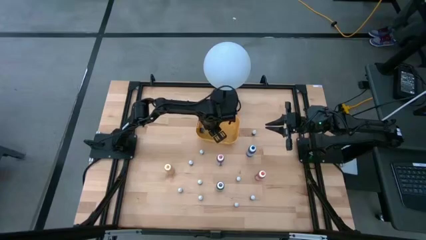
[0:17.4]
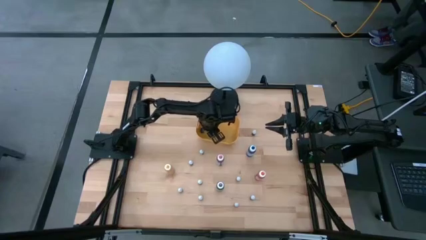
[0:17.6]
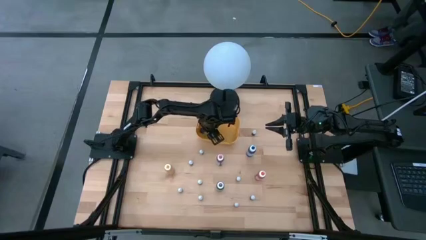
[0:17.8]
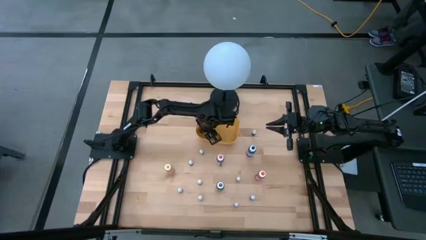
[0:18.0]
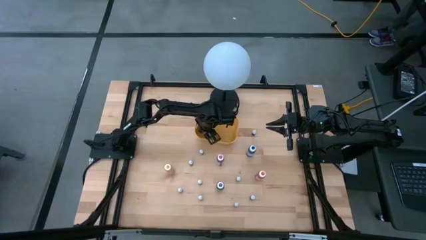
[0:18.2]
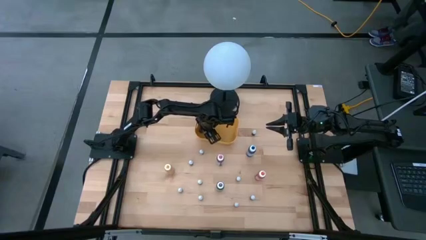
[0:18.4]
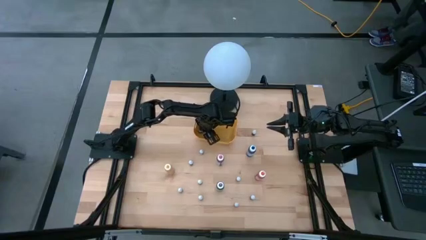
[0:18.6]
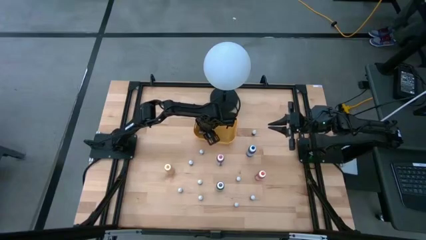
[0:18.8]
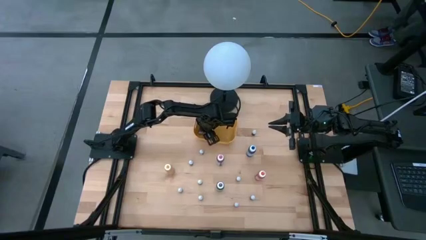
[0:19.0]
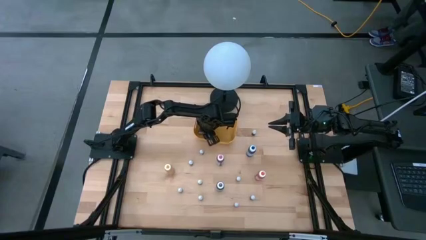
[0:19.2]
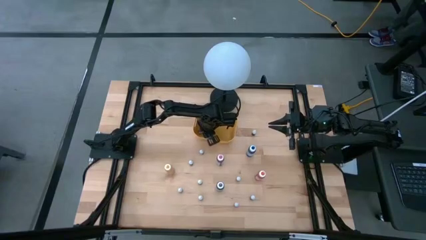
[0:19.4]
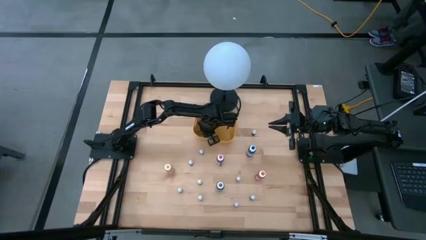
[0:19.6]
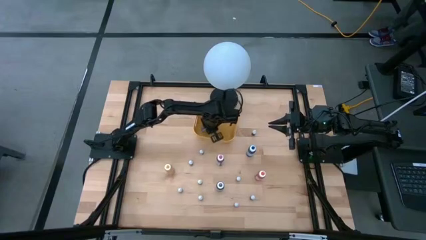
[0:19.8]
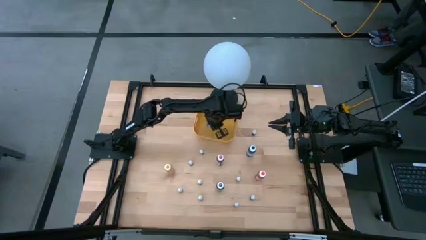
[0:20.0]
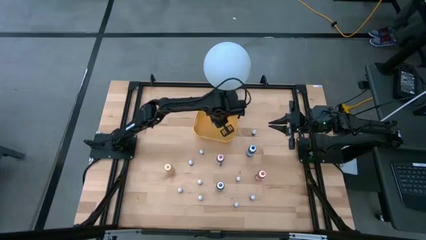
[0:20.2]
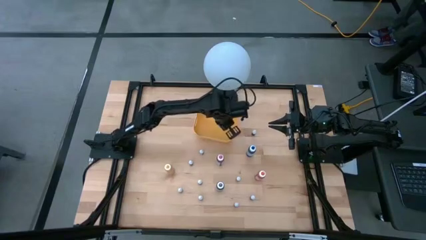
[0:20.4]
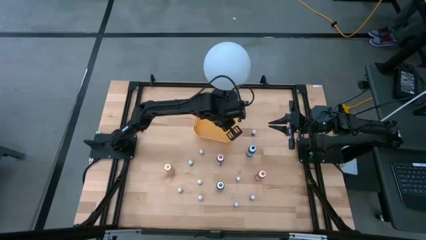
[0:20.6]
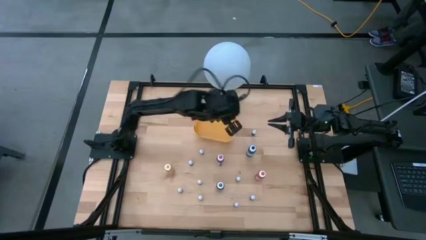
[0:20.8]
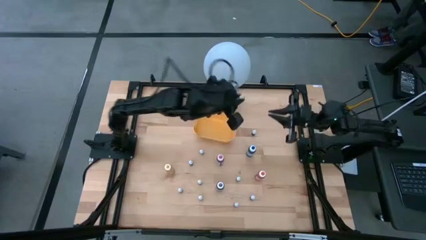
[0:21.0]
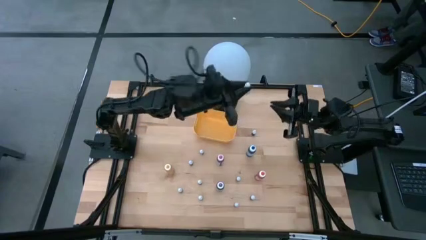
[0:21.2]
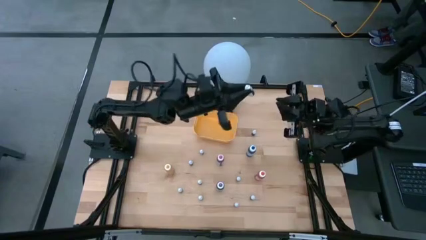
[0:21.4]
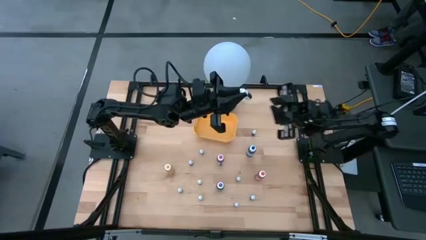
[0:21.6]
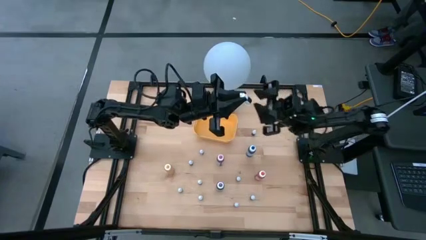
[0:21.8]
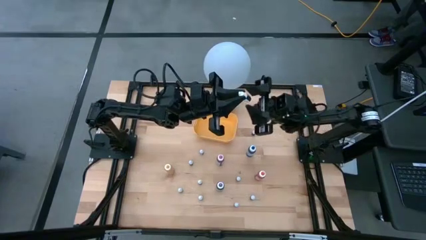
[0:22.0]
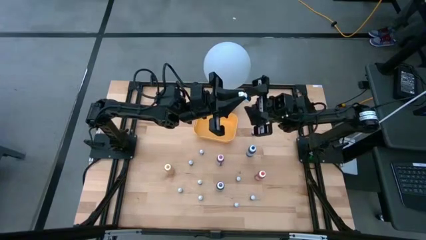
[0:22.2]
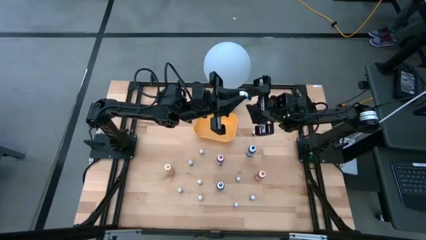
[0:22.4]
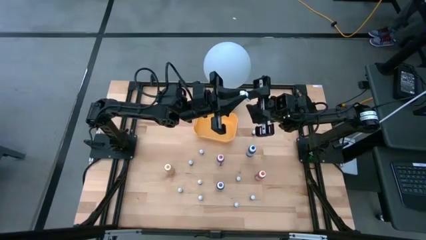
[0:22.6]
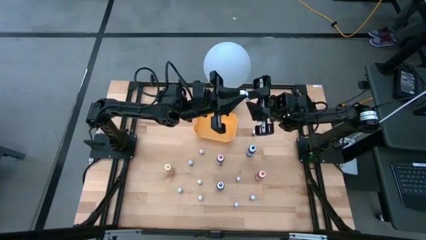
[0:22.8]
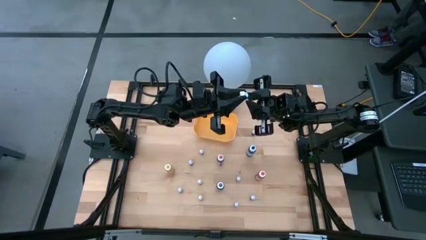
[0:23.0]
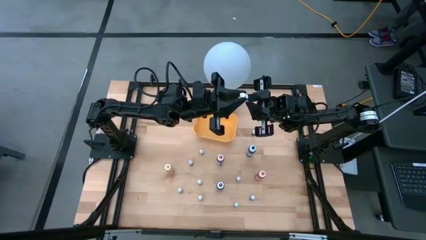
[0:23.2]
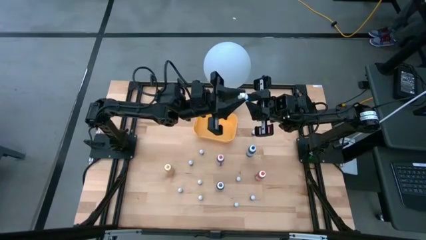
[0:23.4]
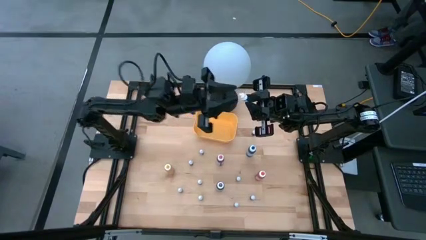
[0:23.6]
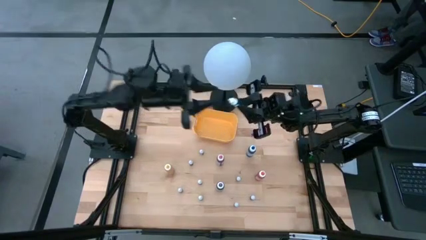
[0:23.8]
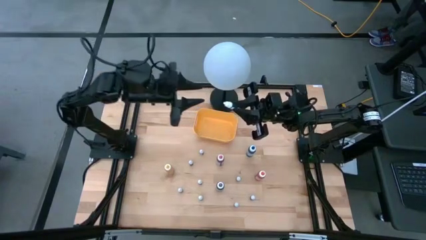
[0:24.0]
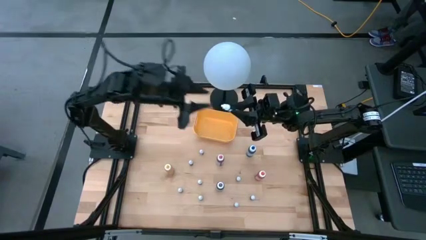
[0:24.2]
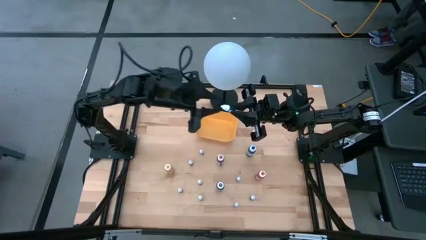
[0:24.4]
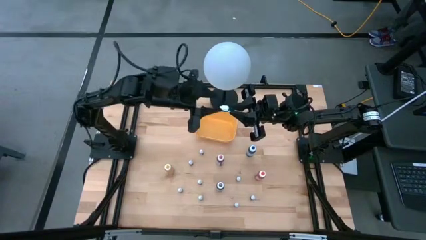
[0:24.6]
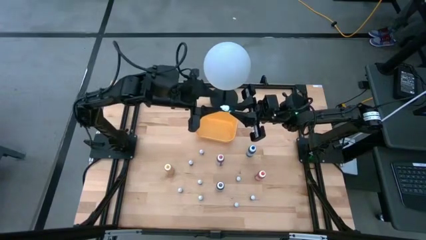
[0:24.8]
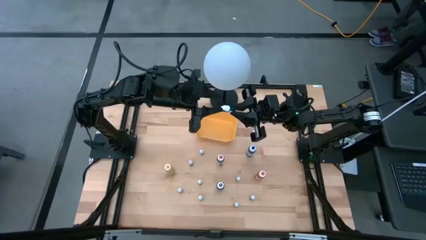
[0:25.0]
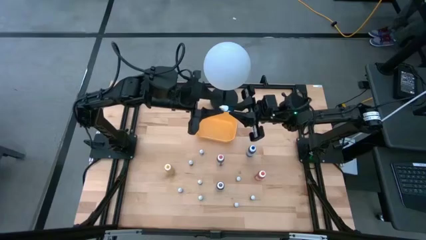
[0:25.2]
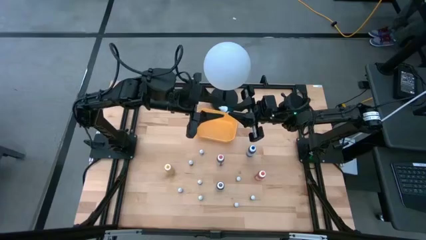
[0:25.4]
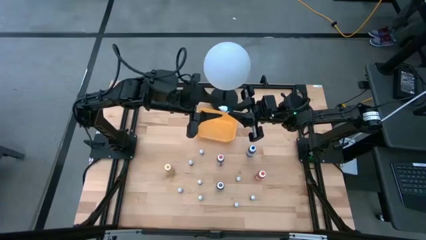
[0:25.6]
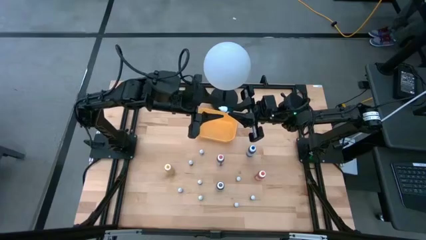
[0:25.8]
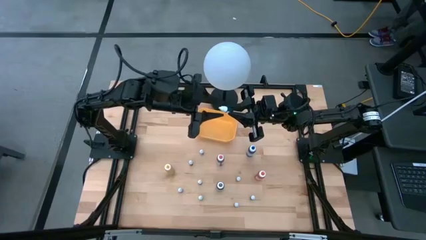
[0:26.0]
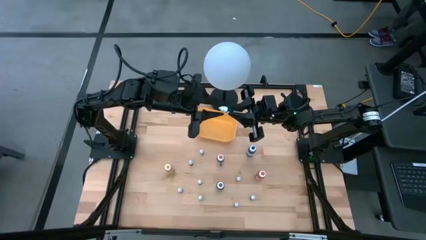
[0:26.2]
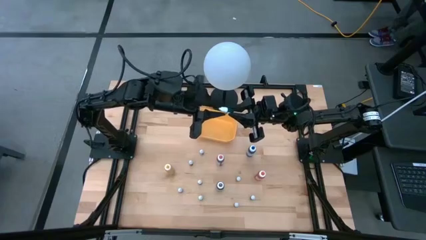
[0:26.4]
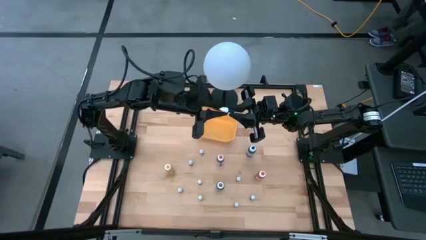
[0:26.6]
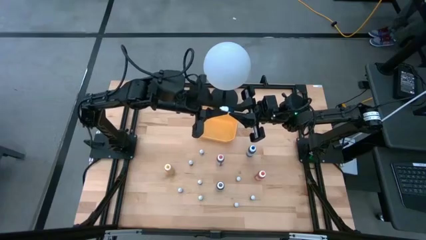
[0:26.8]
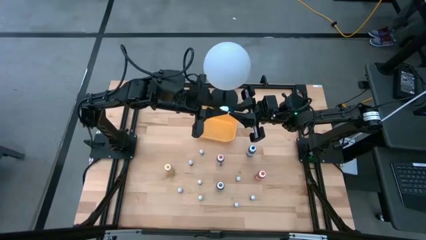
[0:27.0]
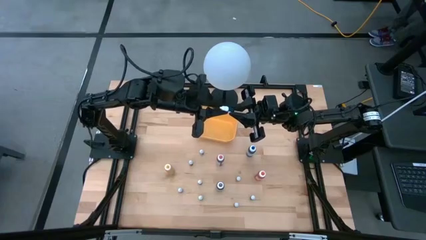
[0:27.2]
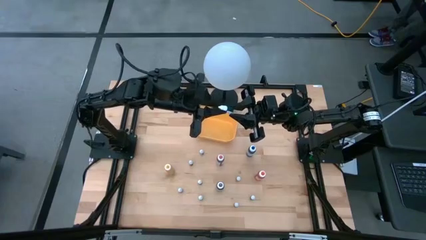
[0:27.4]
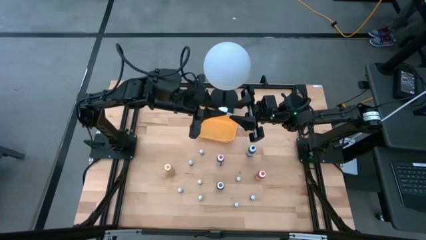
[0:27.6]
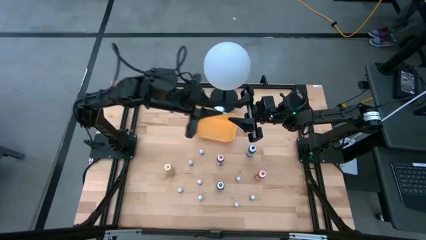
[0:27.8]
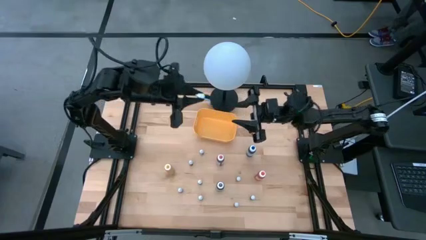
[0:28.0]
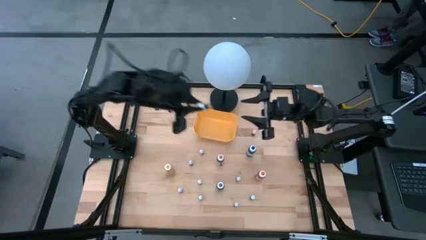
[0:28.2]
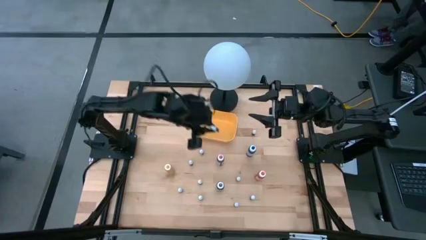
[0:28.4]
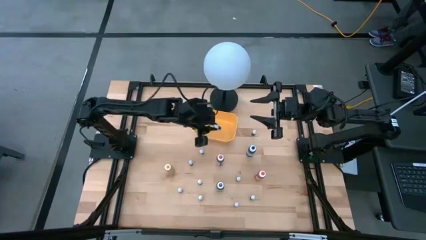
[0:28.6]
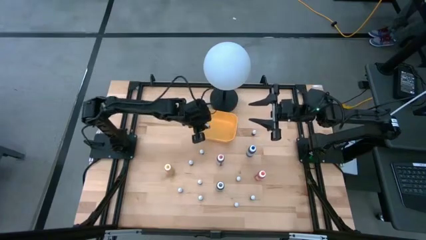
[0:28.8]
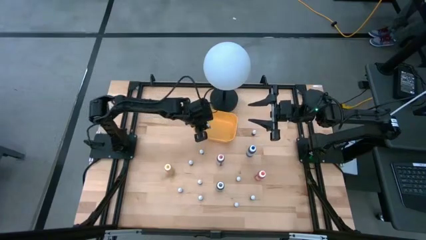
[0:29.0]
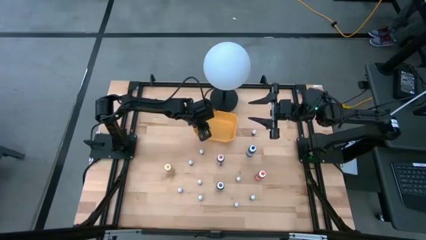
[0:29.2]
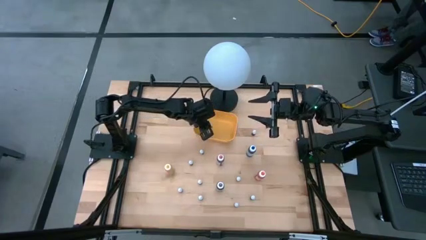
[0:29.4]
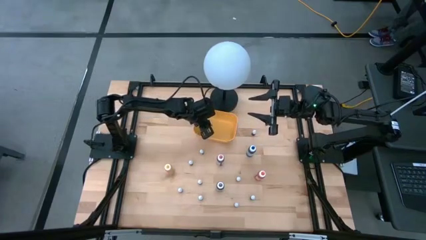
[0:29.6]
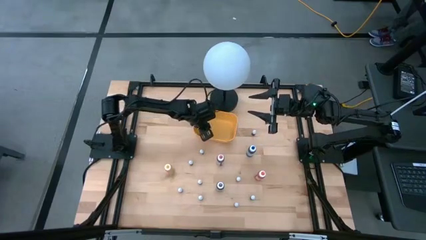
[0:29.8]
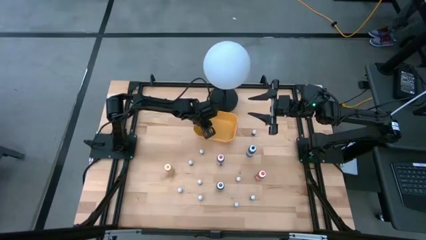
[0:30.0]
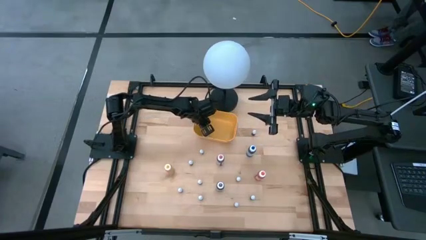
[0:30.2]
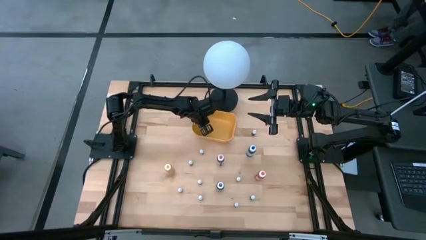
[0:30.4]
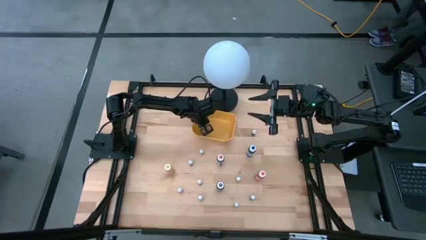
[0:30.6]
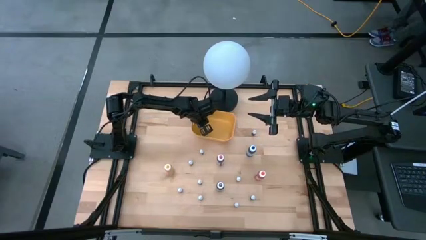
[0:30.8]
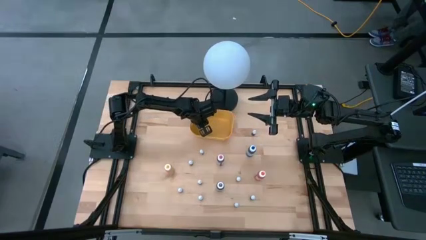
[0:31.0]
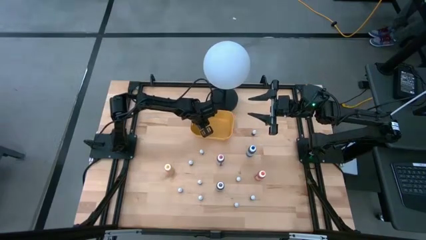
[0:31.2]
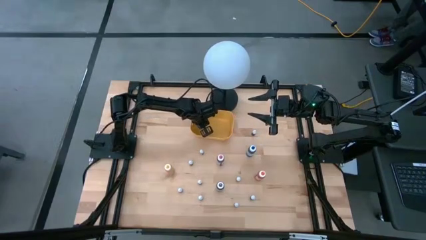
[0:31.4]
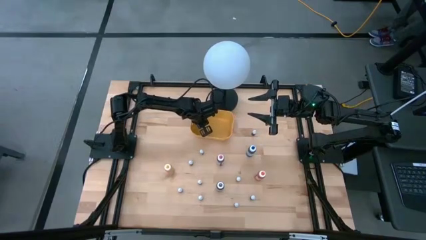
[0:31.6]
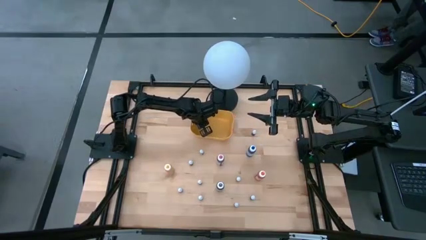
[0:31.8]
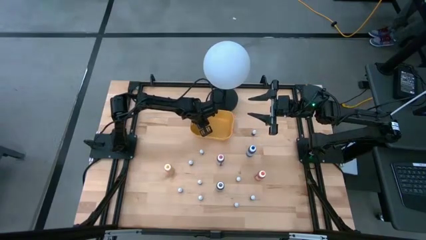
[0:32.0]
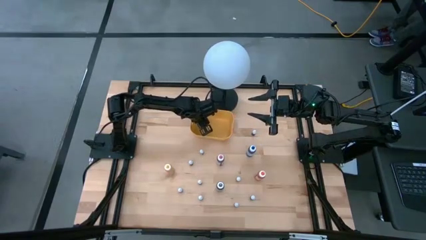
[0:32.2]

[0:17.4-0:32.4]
Task: Pick & Place food coloring
Put the left small light blue food coloring bottle into the yellow bin
